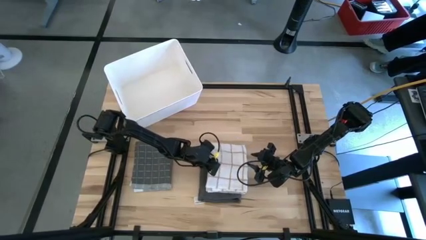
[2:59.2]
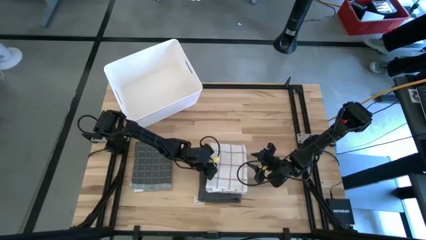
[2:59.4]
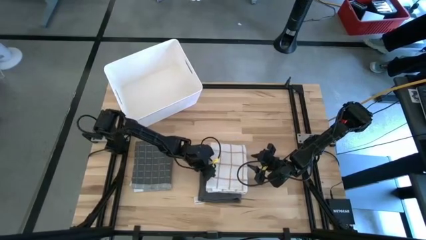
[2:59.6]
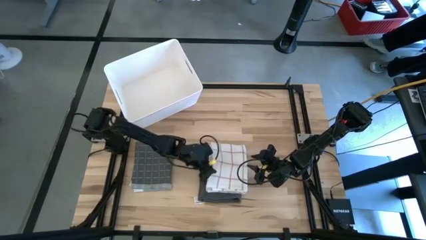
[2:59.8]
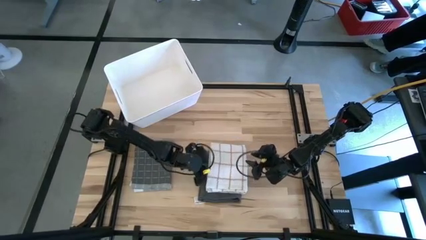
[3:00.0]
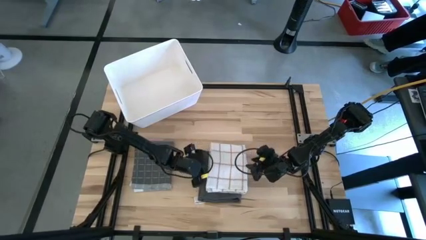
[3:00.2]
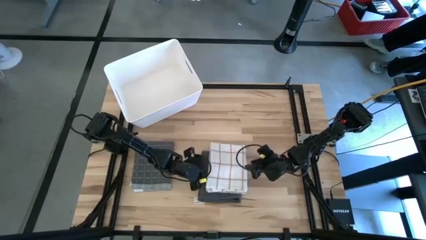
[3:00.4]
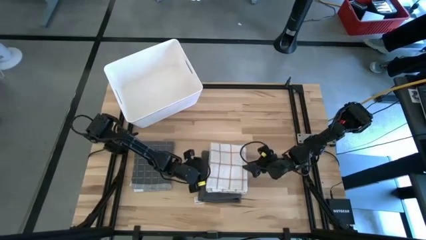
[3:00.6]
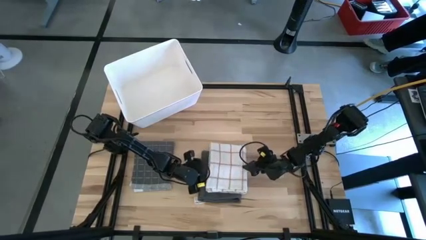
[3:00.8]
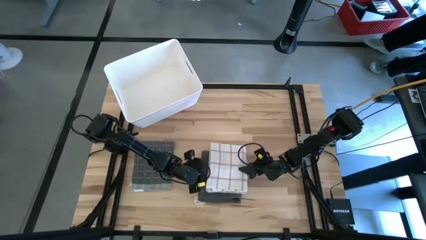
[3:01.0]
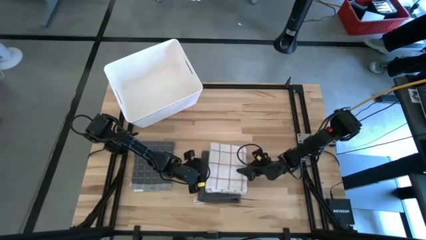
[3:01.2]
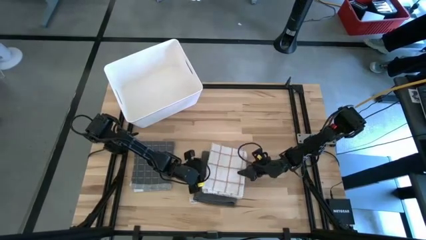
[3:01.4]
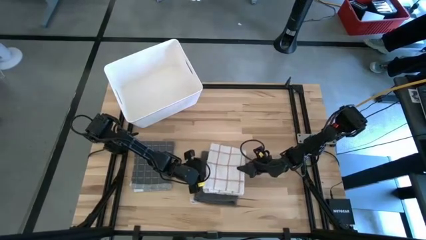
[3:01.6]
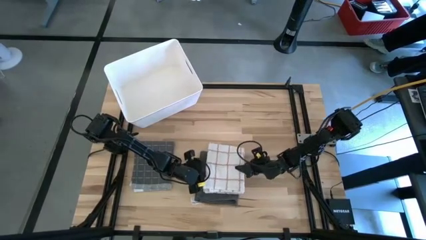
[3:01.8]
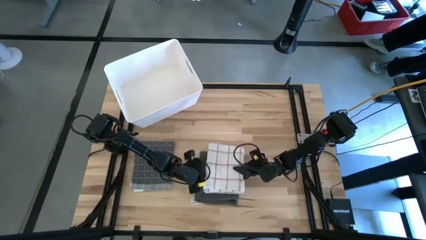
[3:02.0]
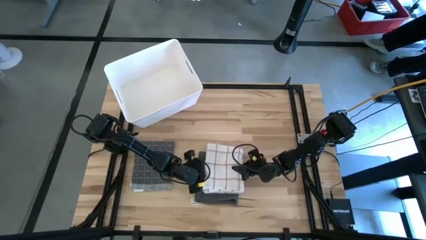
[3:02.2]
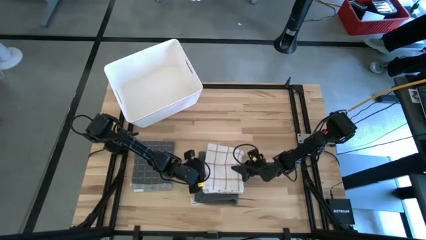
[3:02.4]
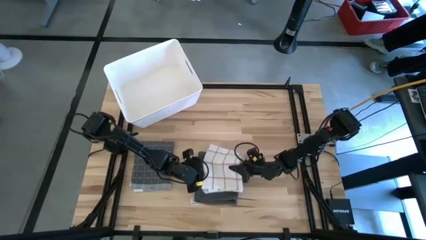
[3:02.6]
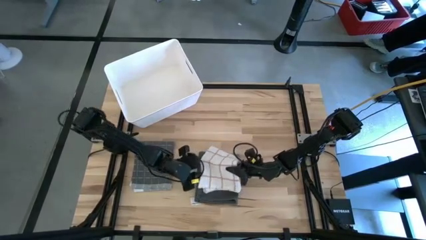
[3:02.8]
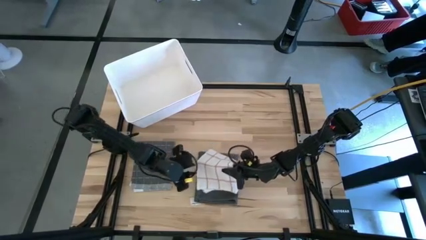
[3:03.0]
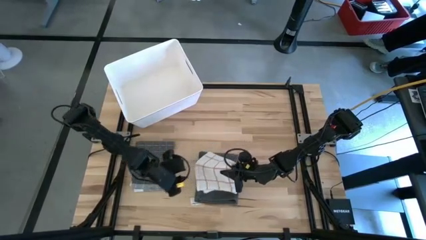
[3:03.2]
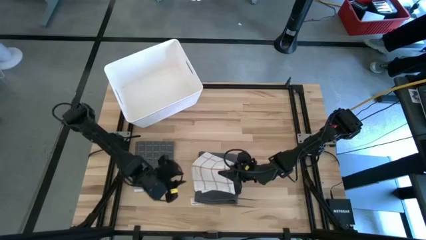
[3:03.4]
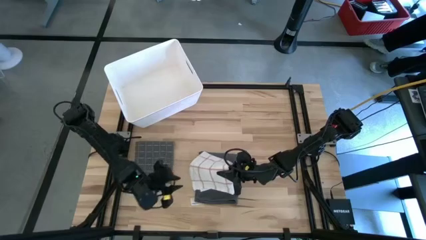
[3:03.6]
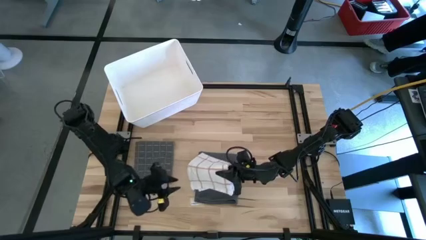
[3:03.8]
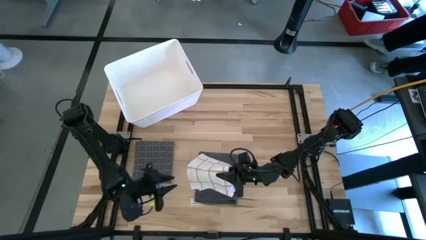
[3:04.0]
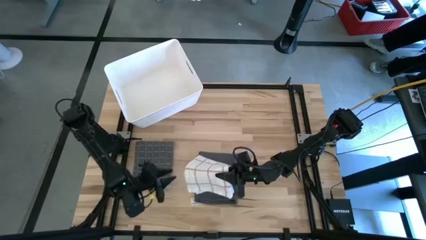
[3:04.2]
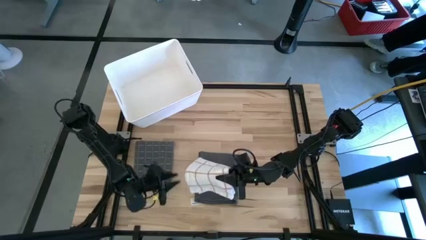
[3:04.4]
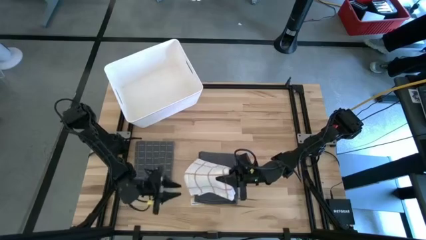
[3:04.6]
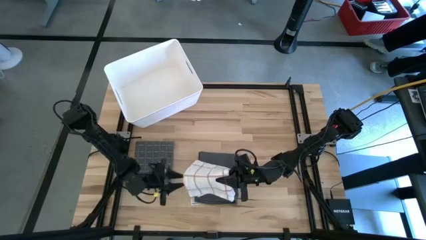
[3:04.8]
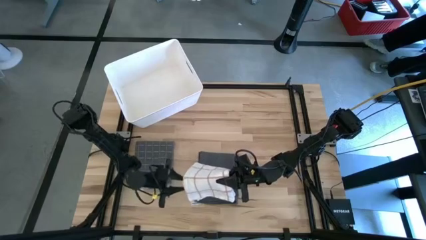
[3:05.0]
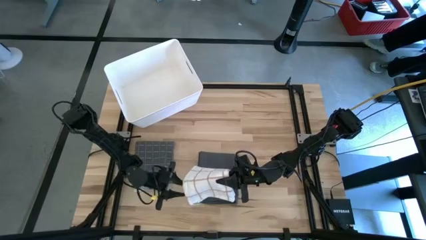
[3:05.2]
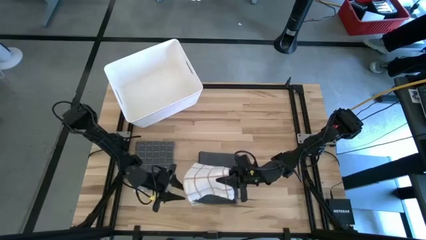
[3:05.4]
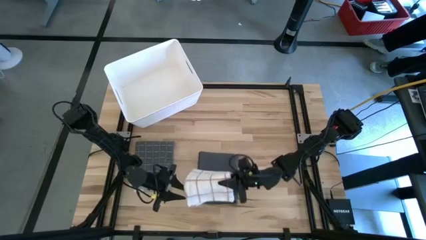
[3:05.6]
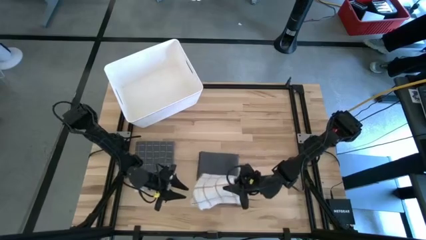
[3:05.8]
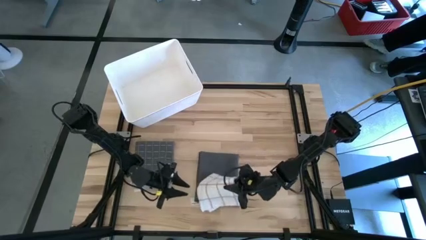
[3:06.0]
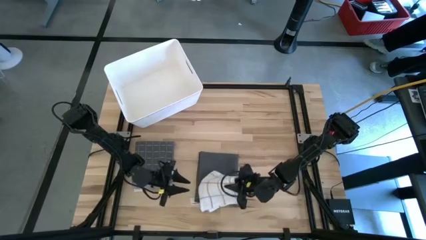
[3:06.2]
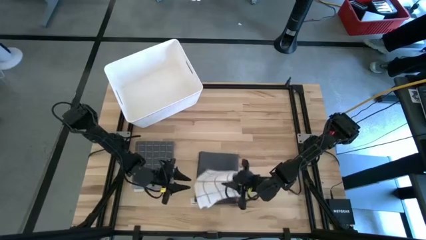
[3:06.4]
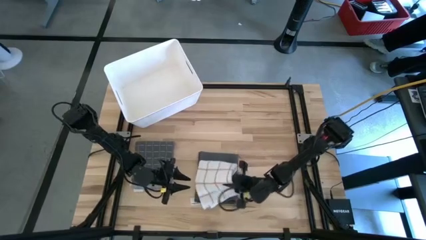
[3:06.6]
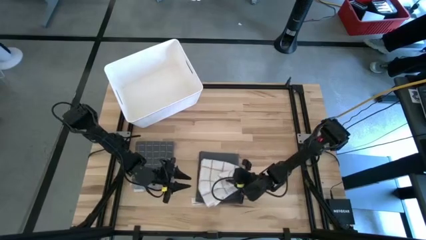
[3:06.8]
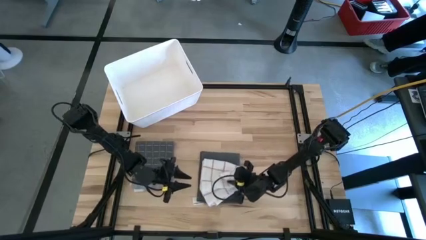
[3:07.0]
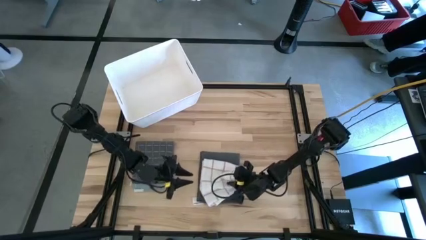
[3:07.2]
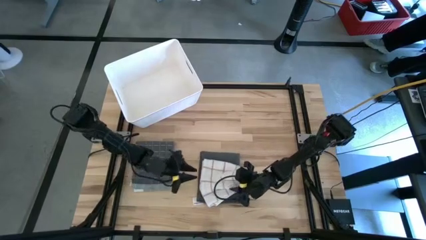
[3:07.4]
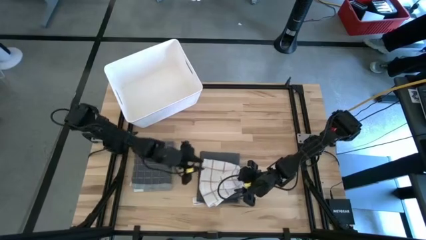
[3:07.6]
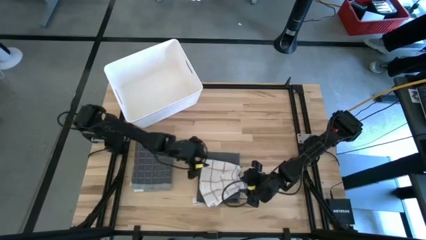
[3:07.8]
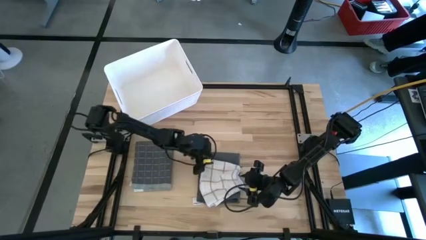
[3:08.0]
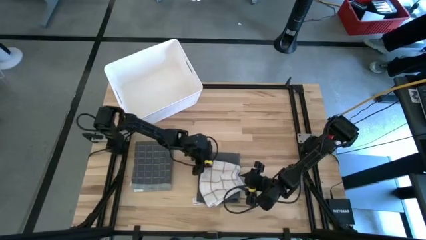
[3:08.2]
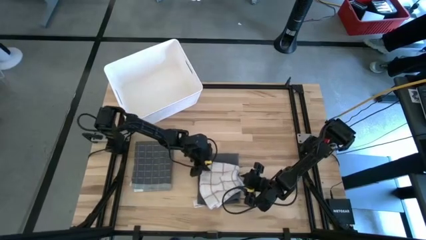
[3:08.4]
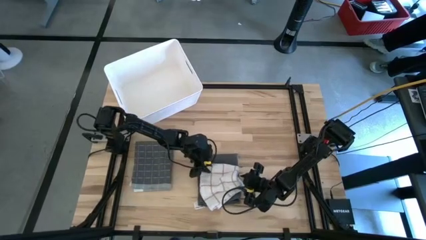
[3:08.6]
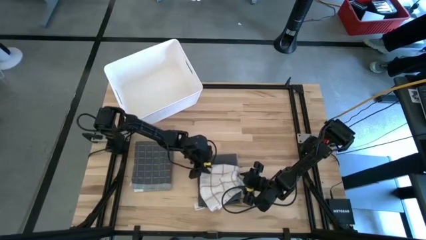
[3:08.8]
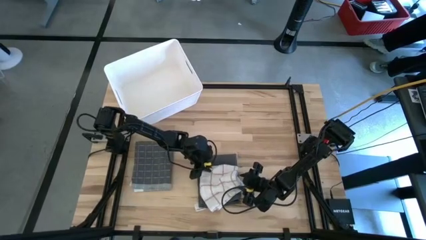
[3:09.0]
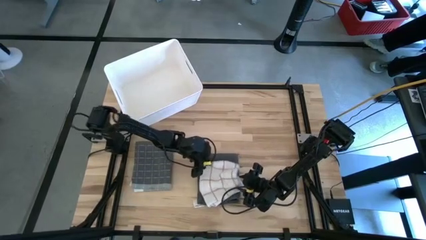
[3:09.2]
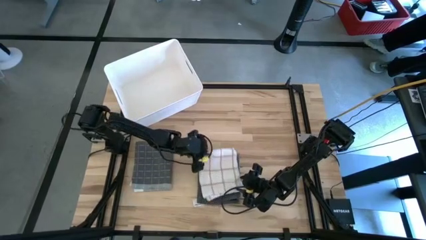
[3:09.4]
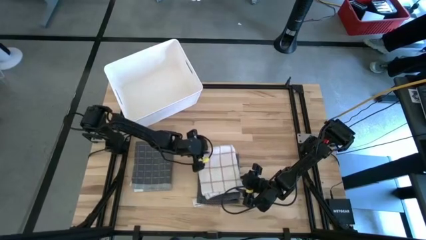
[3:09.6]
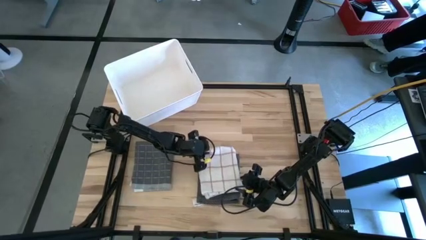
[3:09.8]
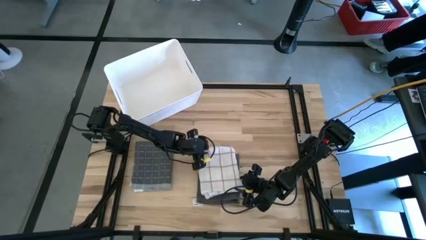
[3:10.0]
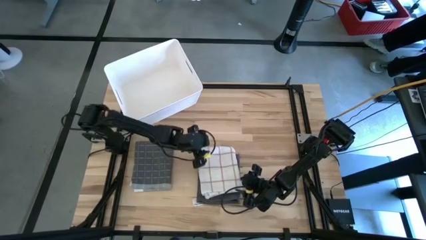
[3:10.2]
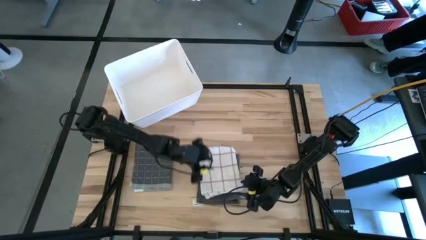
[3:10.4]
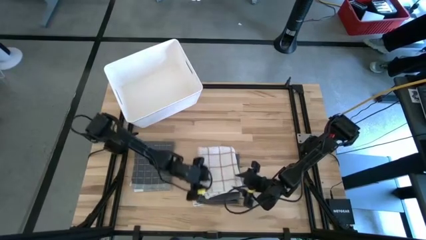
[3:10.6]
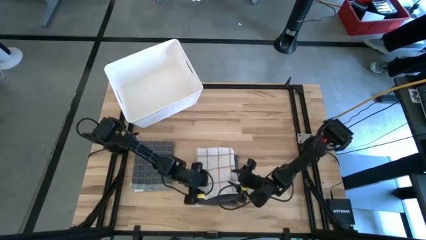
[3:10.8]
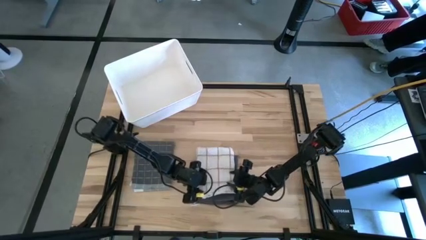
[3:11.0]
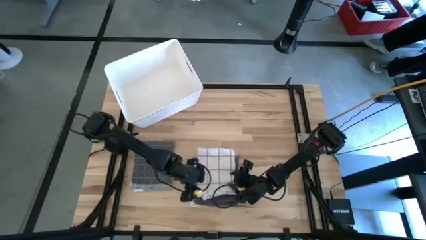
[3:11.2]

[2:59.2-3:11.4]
Task: Fold towel
Stack the folded brown-white towel on top of the folded gray towel

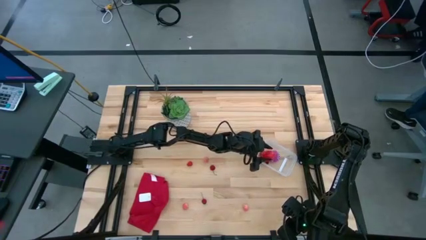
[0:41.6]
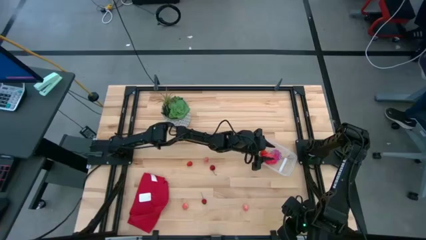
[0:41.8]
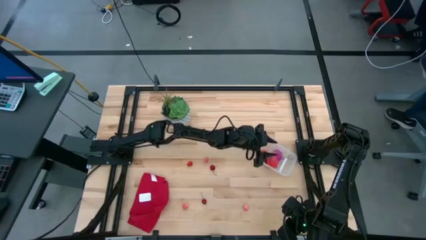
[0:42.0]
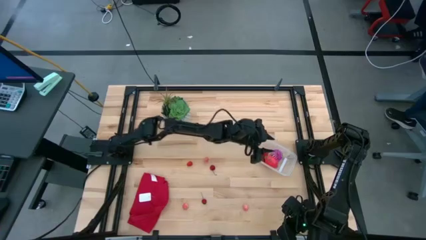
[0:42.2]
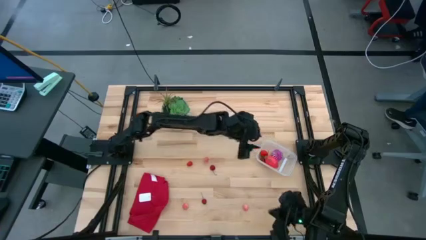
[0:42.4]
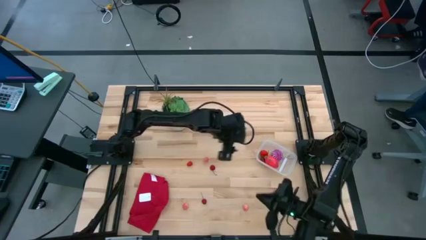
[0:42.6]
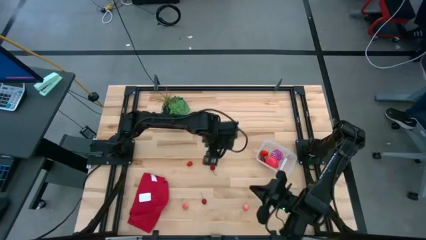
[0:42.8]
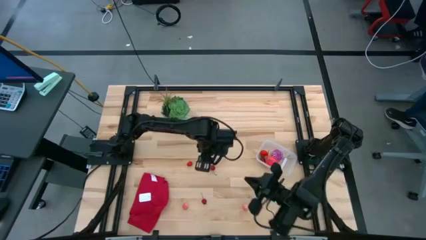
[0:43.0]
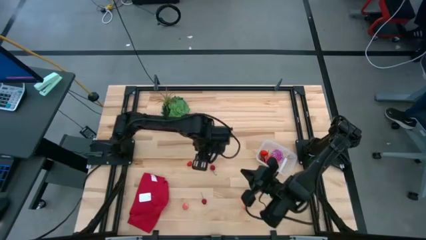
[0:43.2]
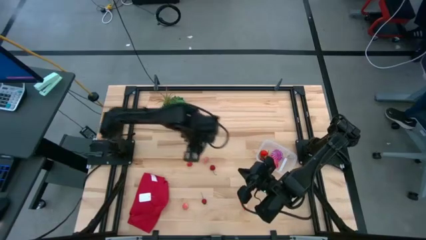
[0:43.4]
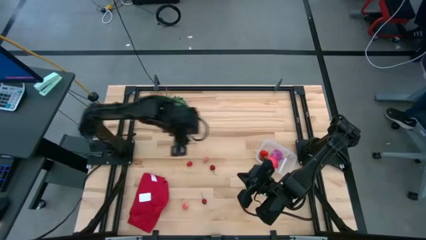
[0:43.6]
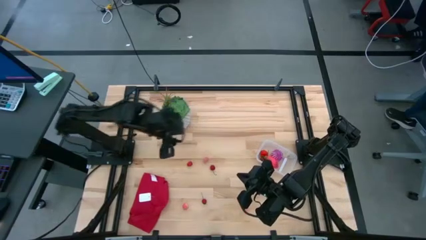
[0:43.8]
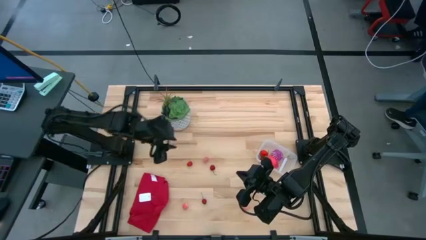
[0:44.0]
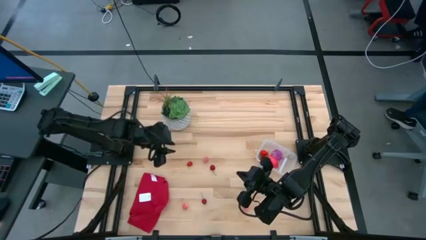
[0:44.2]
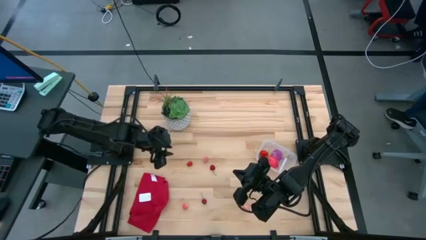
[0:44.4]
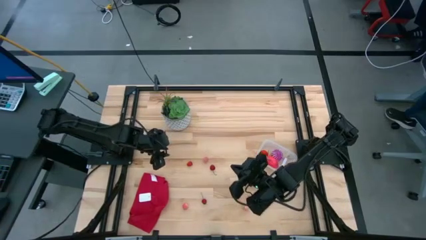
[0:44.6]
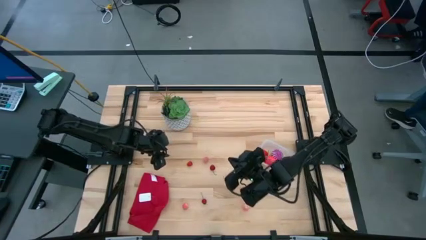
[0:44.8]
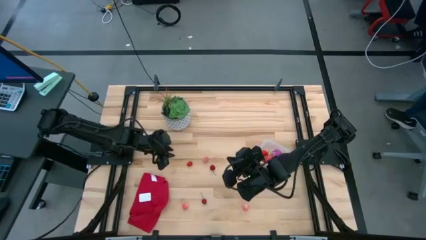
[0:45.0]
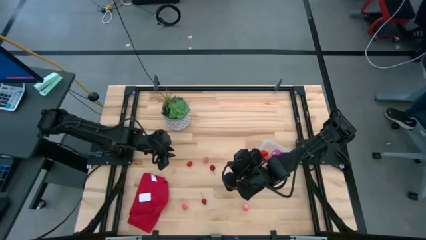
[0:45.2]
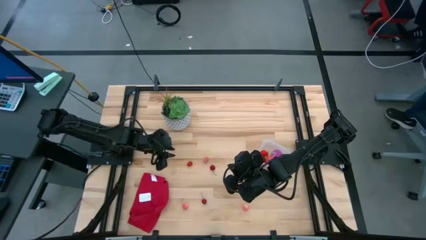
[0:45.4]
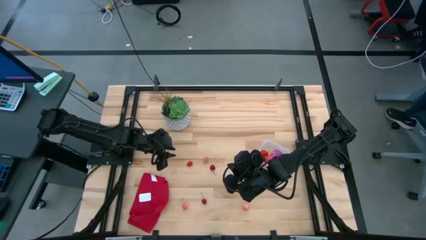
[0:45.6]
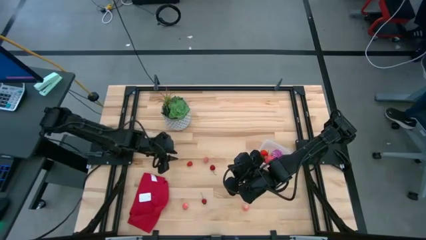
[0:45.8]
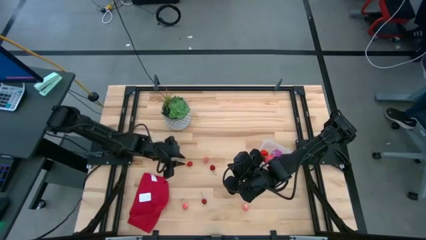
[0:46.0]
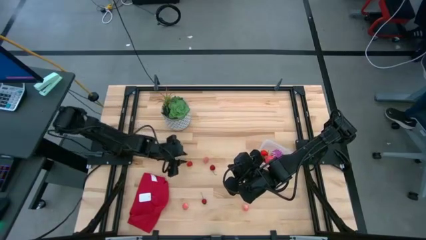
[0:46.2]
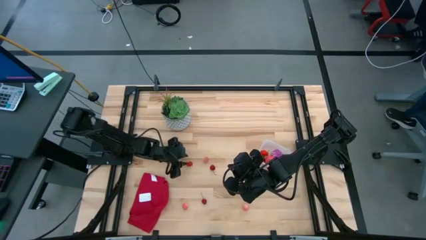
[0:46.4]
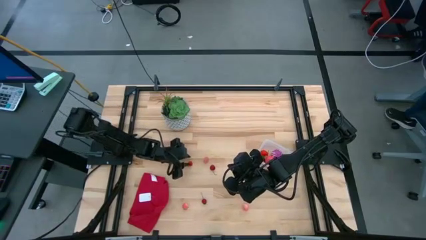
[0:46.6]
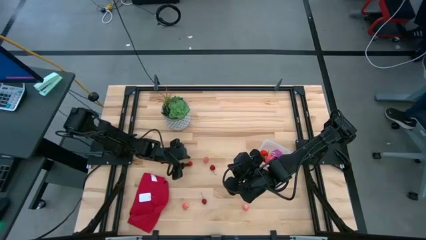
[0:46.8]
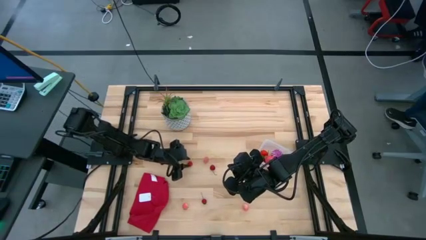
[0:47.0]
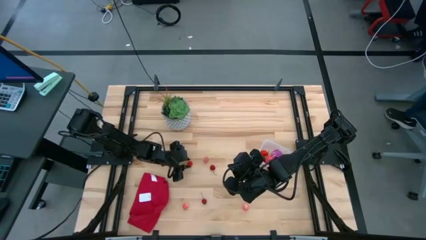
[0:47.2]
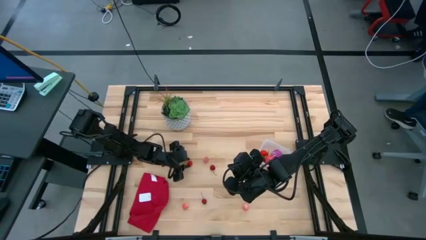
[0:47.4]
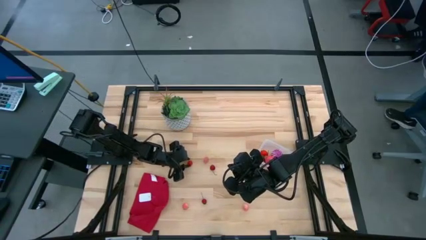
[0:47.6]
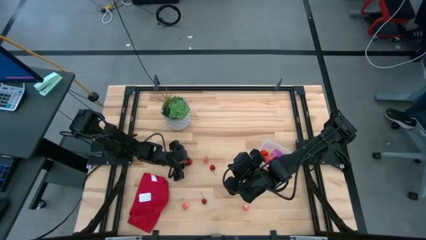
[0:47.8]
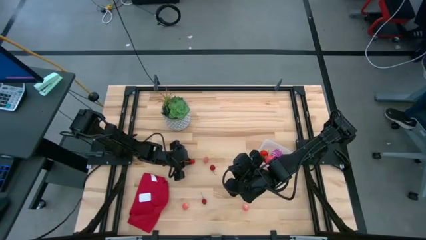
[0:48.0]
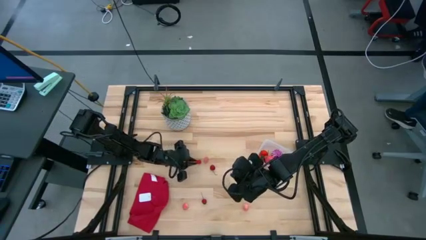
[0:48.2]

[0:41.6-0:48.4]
Task: Pick and placing Produce into tupperware
Put the red raspberry into the transparent bin
